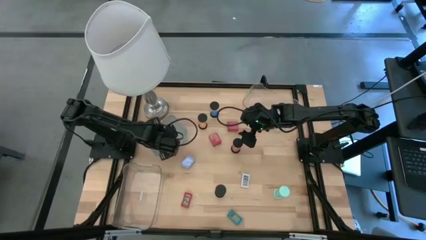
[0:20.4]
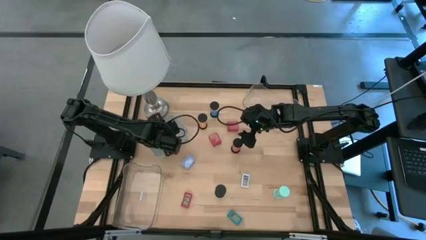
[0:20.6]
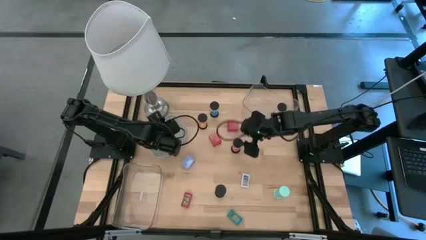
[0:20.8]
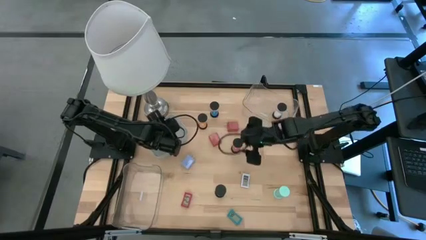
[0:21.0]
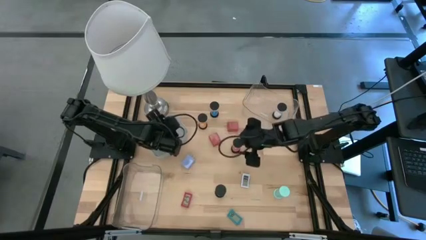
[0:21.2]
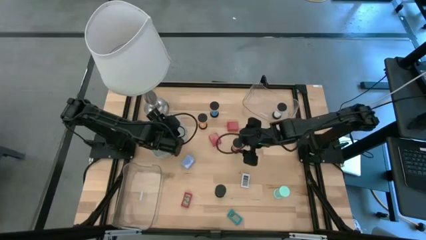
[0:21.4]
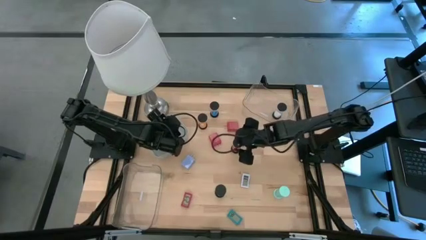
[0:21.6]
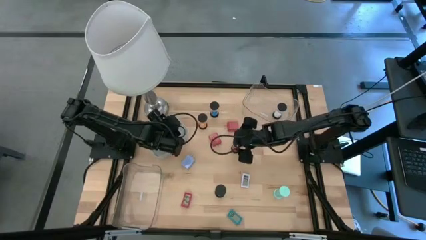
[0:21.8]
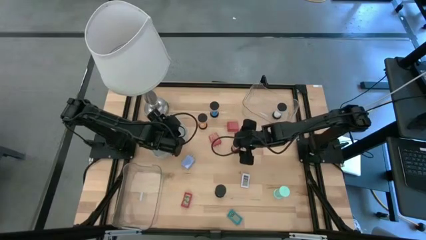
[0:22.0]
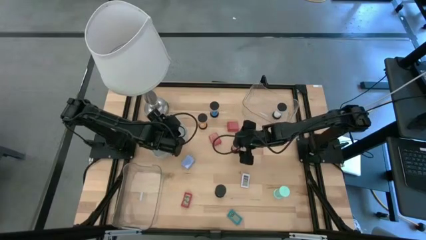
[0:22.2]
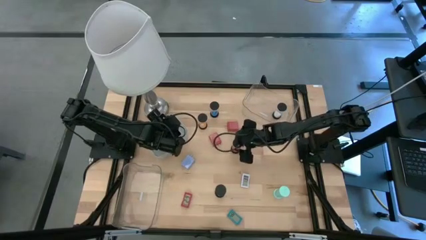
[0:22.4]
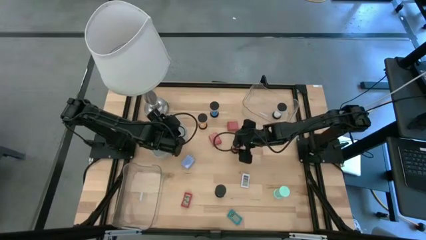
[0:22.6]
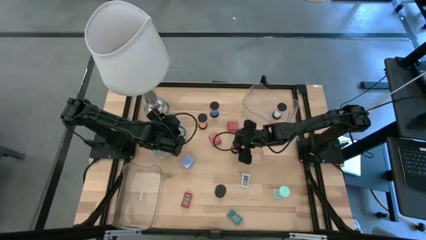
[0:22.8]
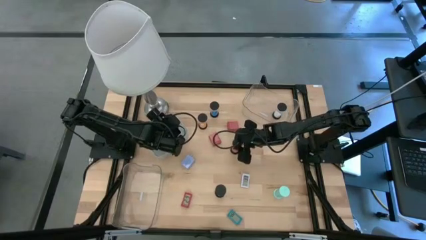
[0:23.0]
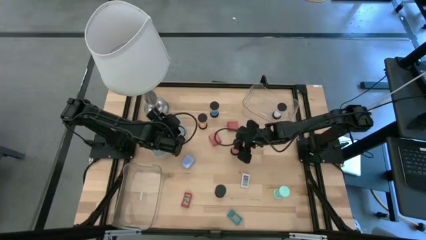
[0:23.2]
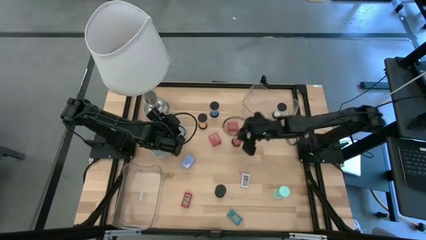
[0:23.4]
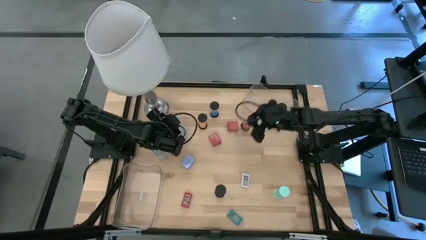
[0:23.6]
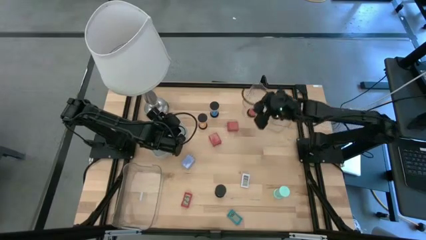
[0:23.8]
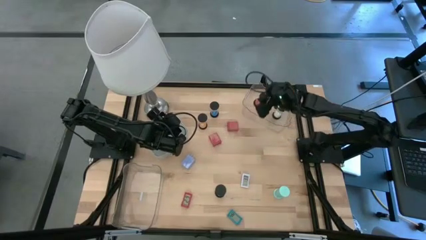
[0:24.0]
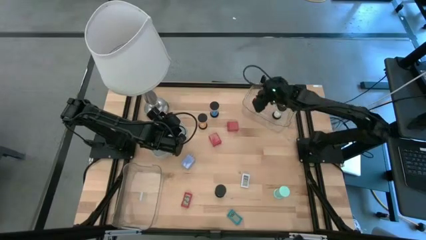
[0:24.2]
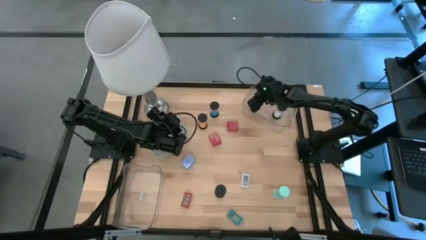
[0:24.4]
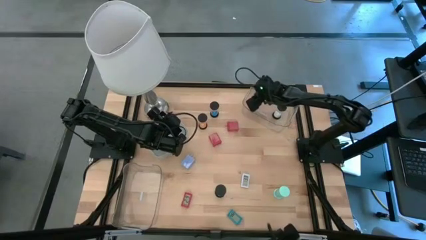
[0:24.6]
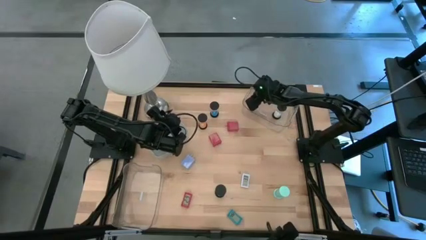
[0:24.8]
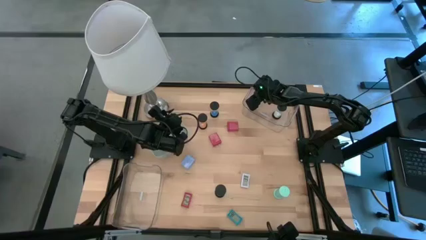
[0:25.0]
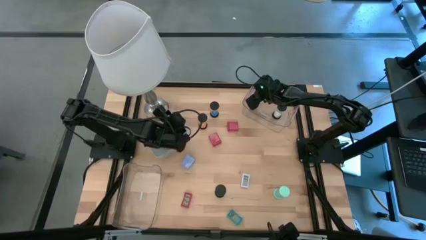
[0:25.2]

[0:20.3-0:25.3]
Task: Pick & Place Office items
Put the red hourglass into the top transparent bin

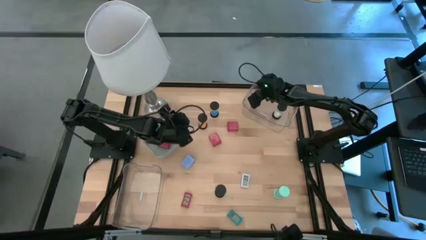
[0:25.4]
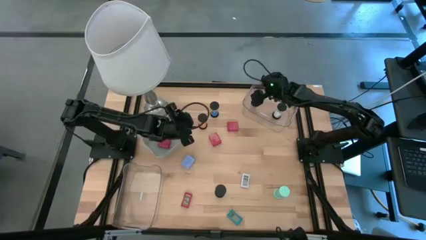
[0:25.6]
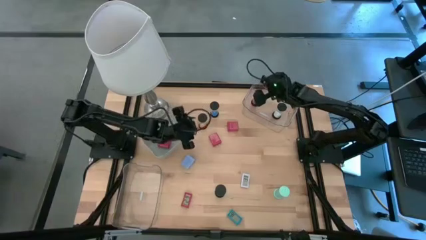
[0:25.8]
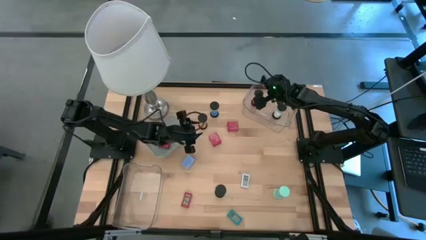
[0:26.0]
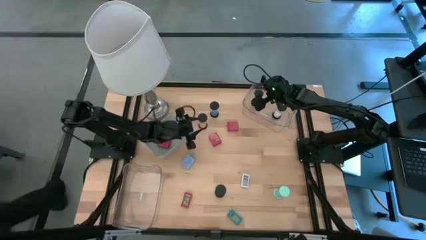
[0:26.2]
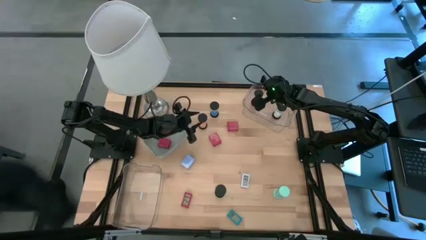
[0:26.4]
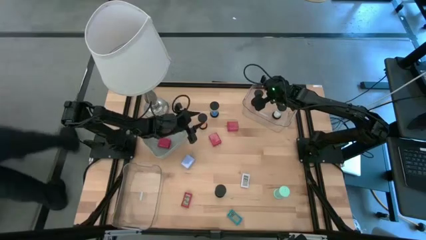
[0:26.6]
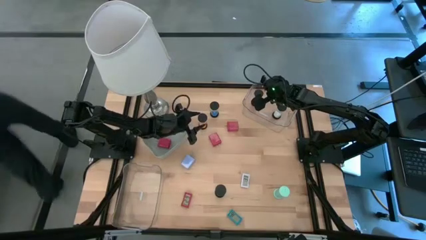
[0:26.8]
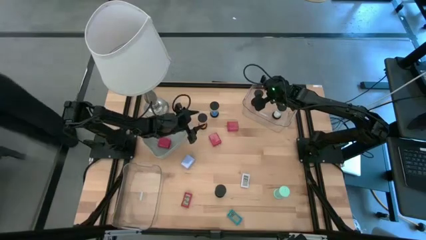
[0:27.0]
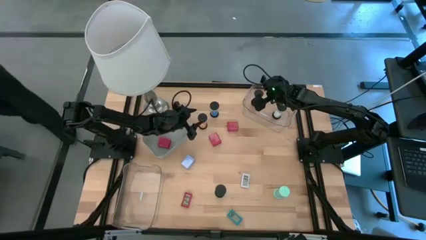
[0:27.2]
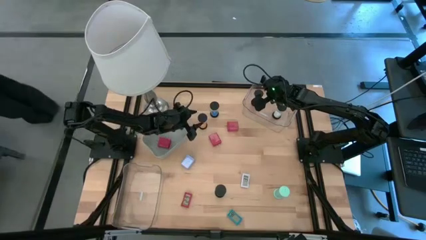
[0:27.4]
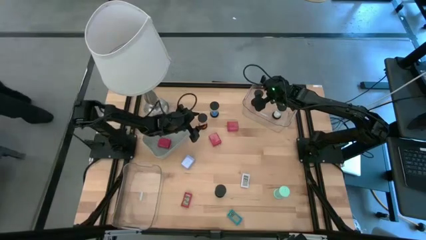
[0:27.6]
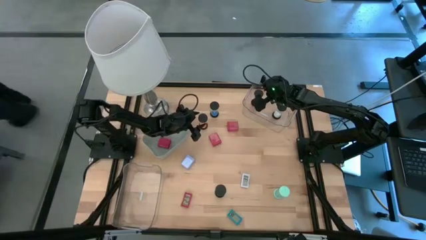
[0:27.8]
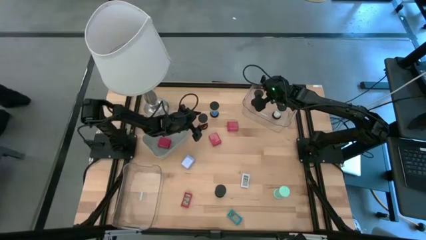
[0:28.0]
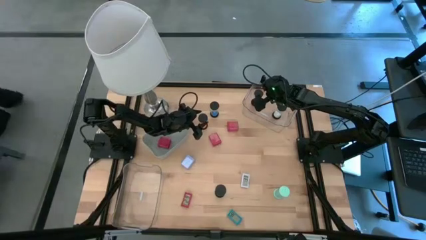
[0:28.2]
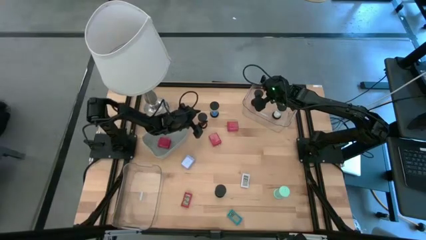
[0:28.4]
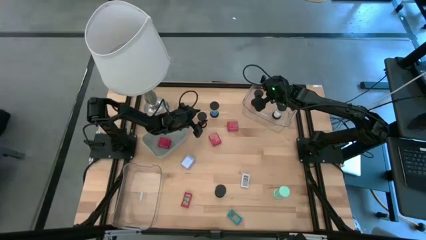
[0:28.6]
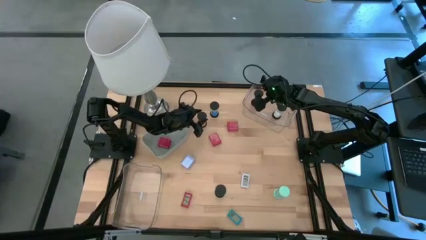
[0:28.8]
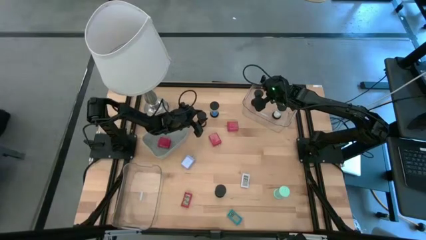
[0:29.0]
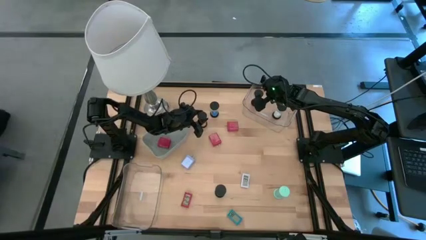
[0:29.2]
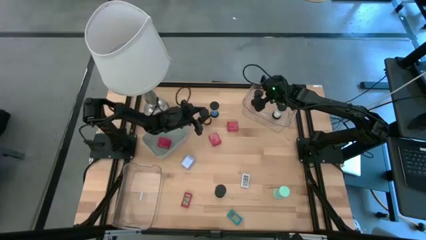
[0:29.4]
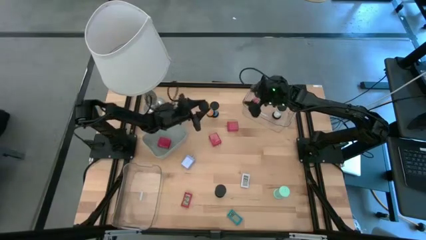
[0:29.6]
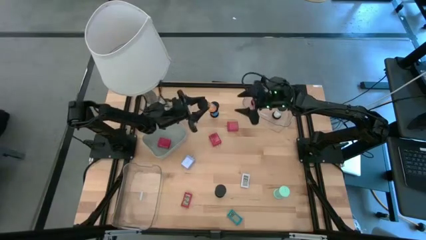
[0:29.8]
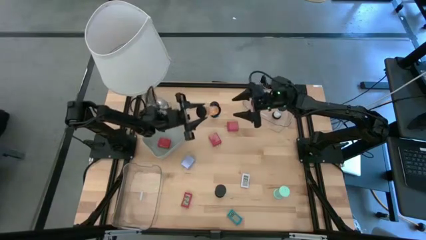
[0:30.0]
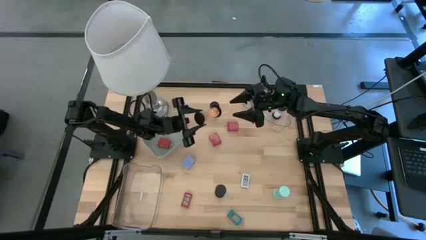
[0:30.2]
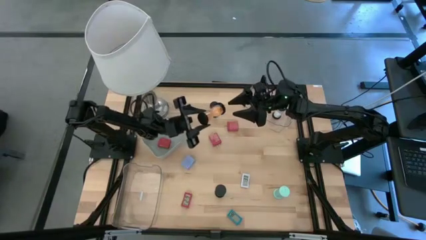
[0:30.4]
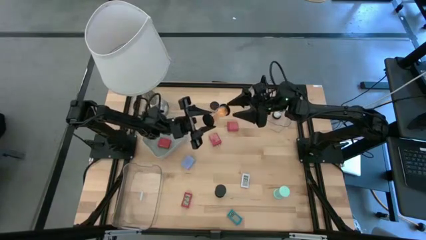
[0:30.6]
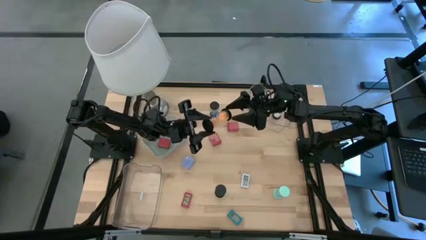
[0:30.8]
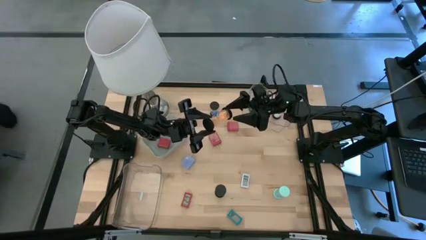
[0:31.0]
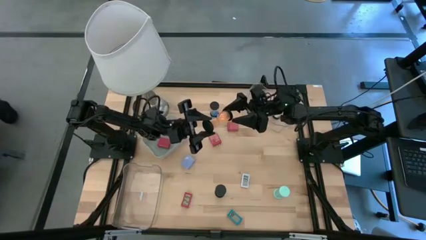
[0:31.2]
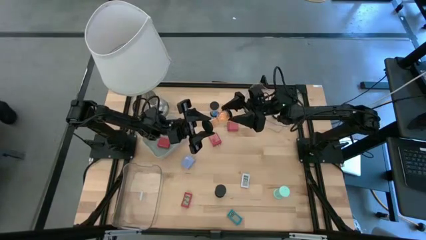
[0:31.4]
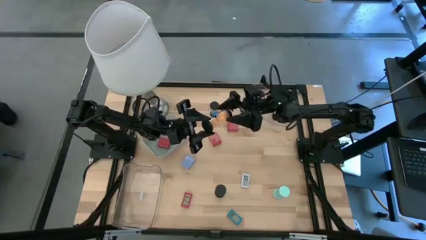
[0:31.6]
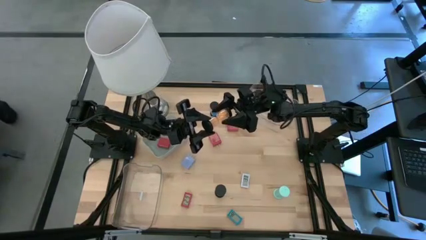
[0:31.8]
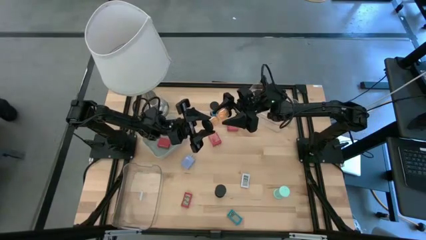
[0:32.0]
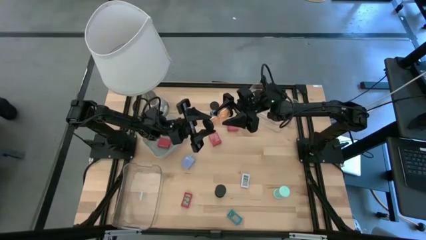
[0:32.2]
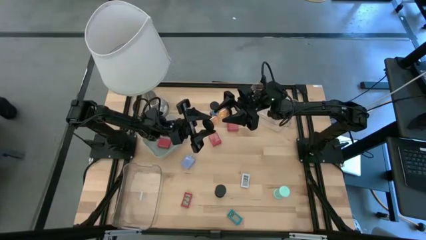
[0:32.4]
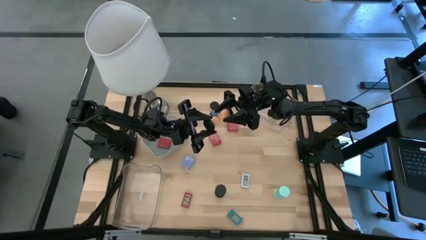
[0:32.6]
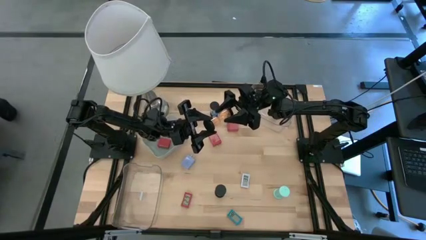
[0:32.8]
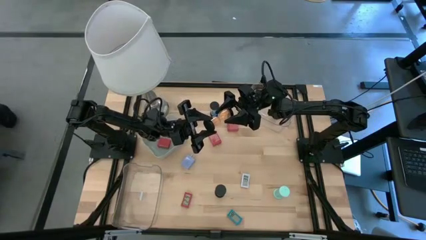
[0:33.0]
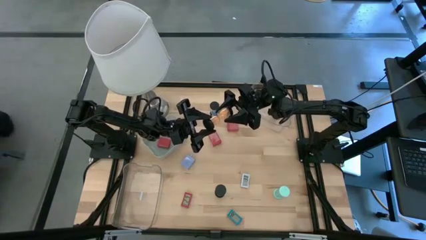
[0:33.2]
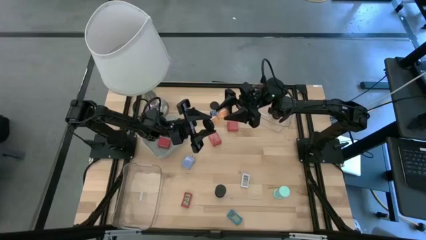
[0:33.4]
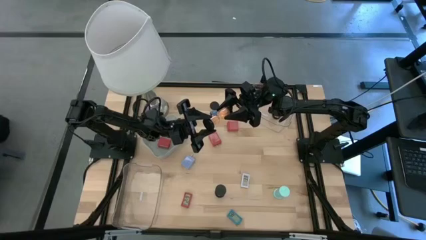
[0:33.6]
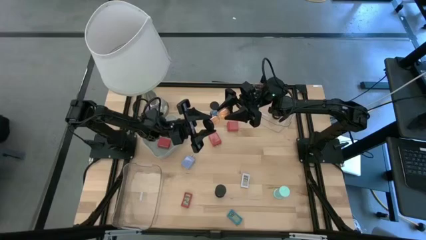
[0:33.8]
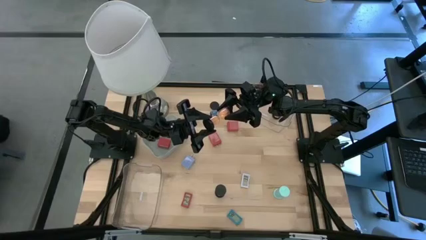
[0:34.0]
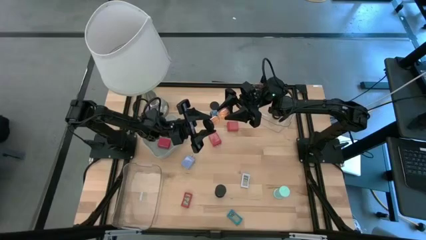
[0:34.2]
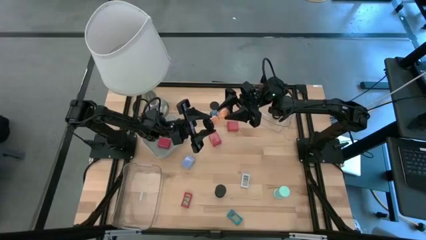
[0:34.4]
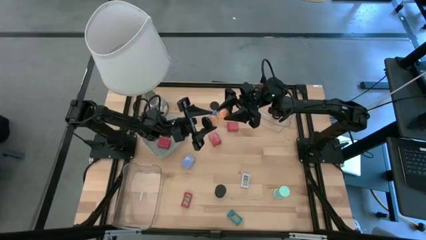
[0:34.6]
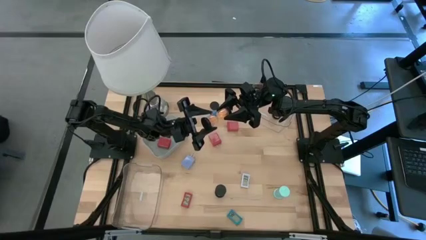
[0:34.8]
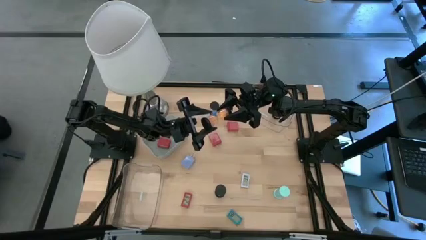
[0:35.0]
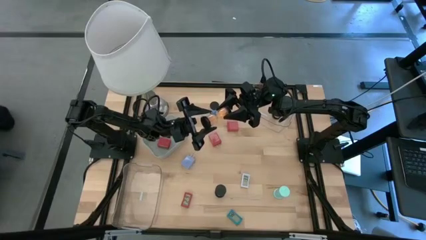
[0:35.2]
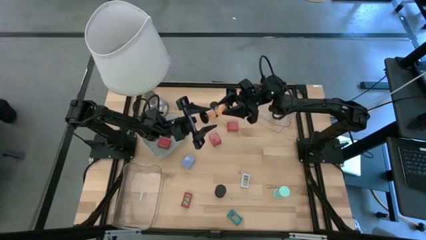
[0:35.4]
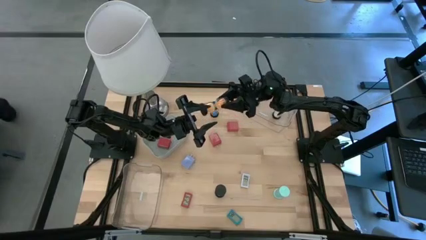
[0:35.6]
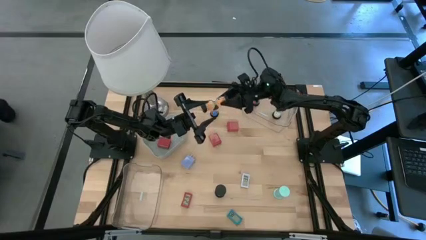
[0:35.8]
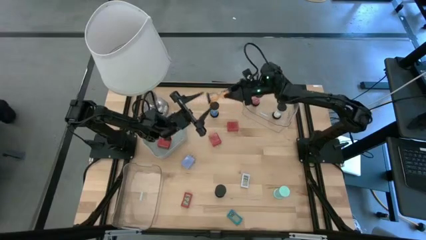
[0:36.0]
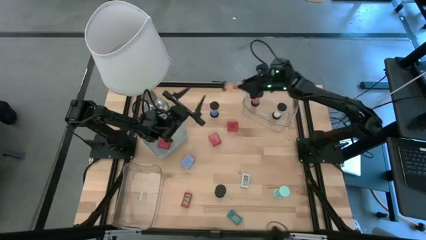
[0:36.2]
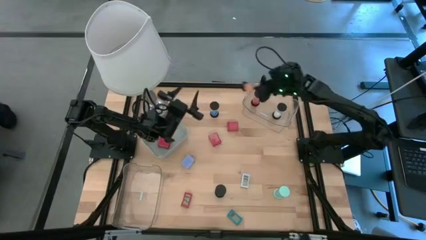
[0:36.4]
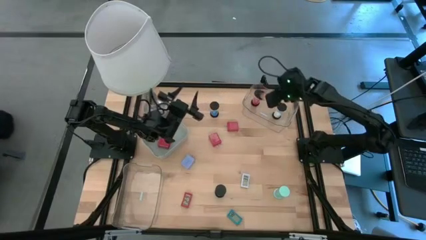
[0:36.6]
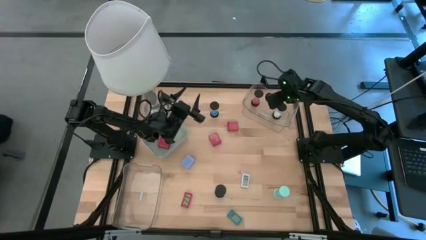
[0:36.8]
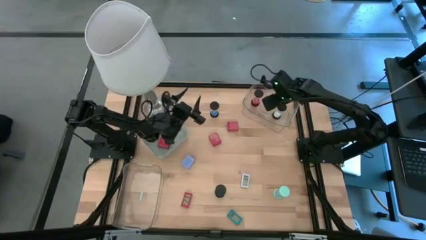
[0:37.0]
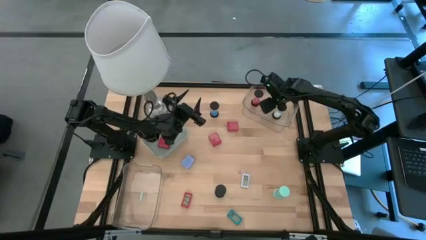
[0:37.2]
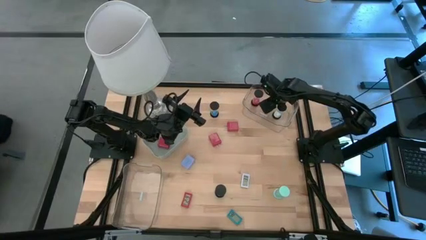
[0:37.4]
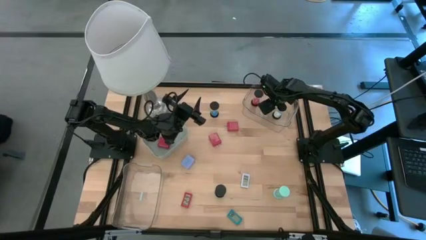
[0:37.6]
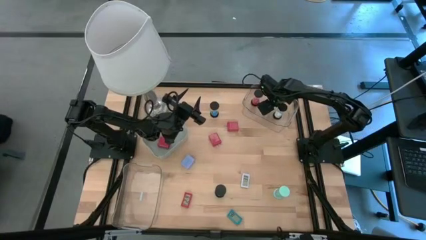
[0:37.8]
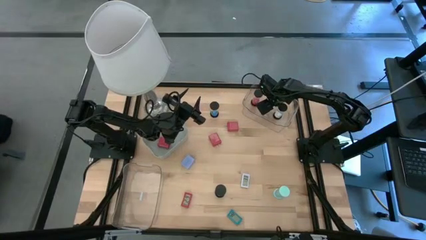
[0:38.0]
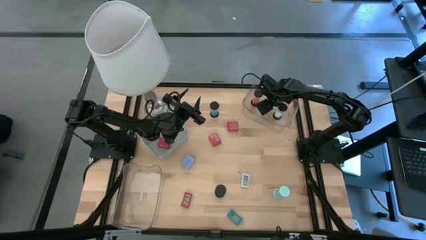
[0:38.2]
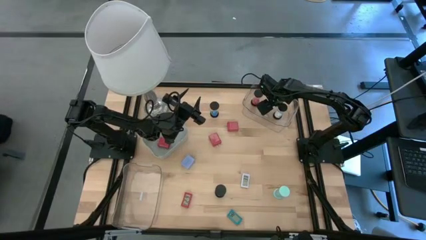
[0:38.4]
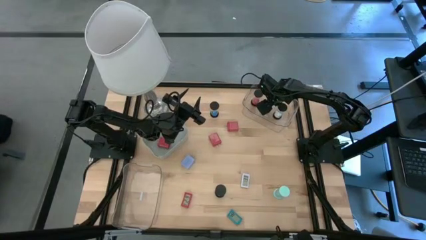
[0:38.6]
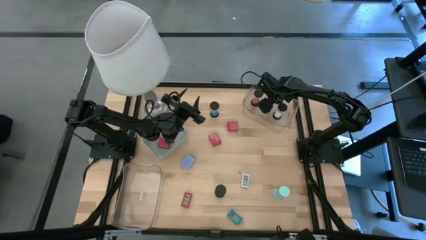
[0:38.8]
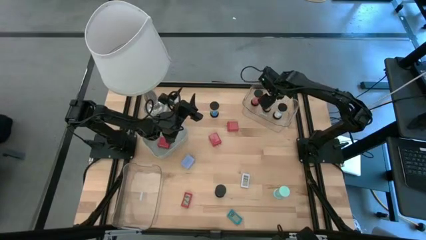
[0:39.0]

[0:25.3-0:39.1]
Put the orange hourglass into the top transparent bin
